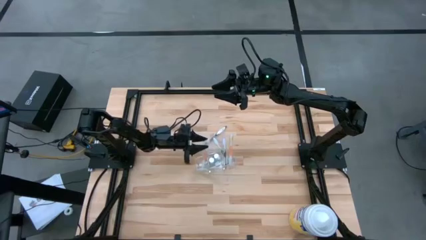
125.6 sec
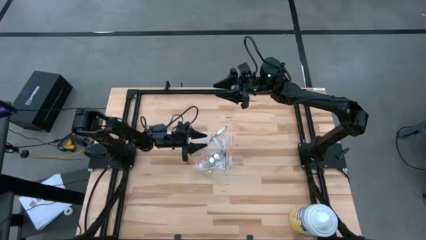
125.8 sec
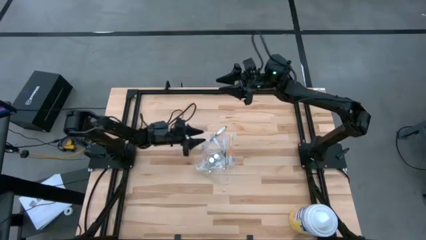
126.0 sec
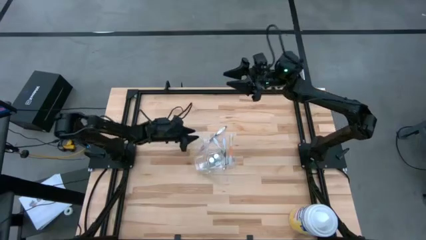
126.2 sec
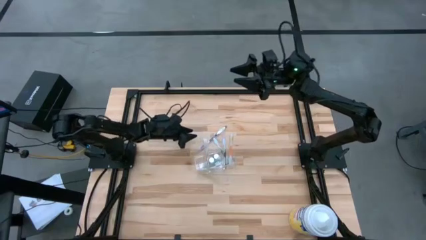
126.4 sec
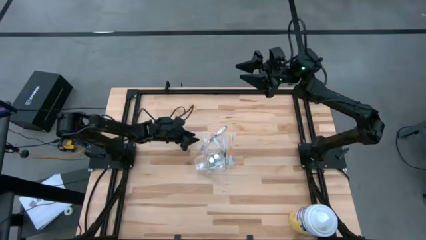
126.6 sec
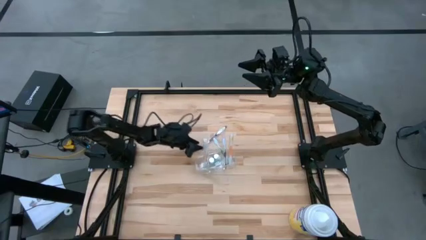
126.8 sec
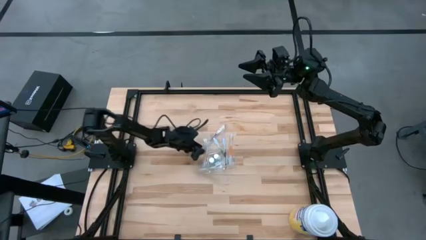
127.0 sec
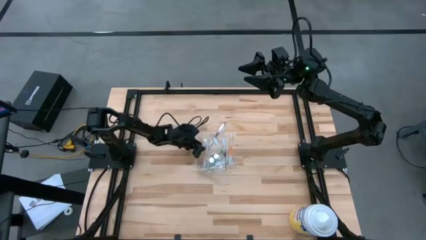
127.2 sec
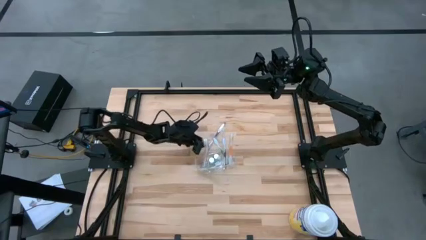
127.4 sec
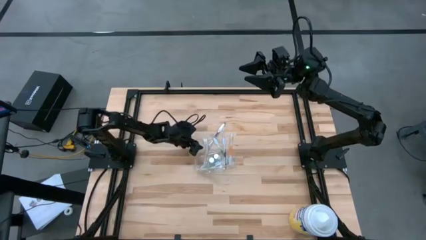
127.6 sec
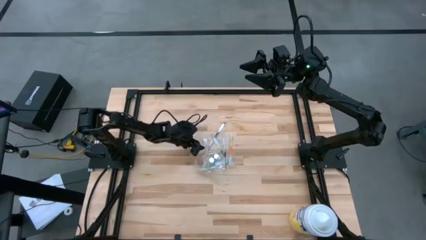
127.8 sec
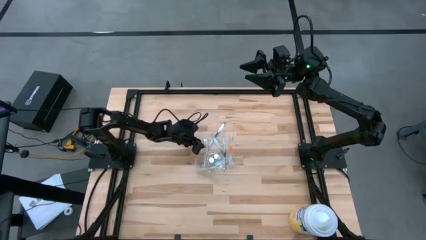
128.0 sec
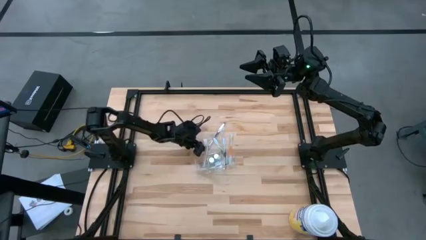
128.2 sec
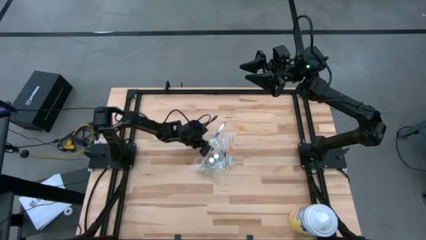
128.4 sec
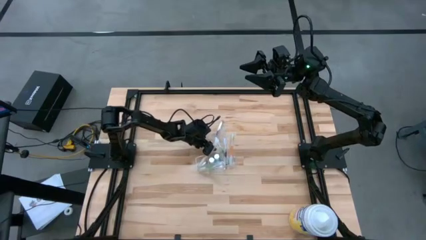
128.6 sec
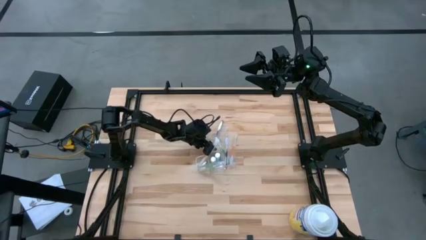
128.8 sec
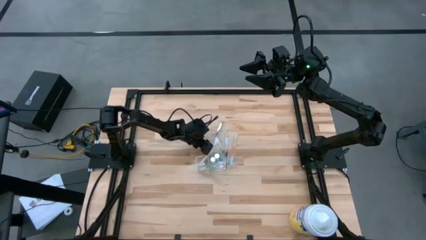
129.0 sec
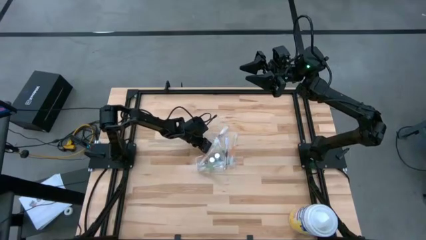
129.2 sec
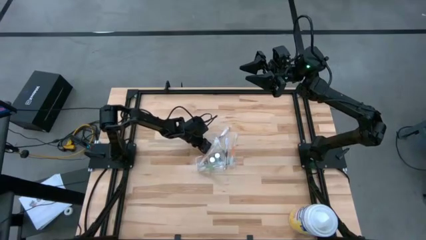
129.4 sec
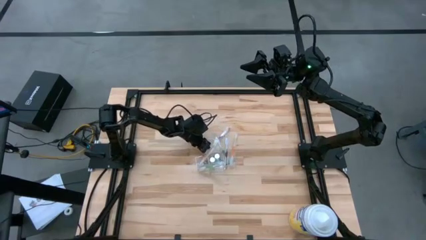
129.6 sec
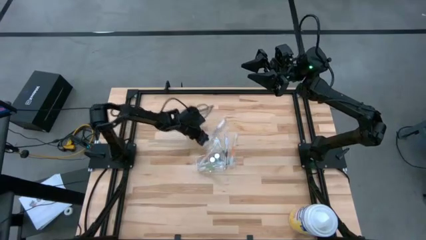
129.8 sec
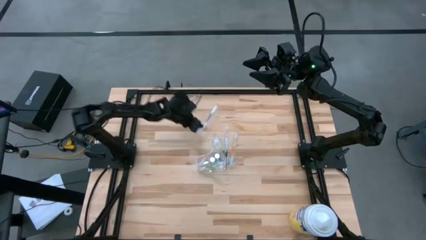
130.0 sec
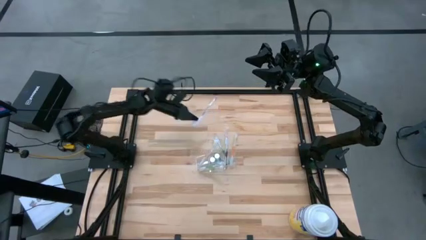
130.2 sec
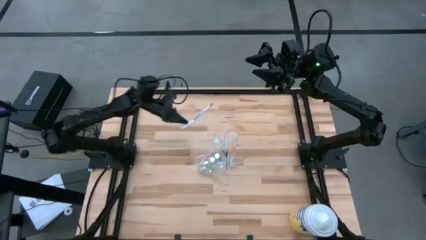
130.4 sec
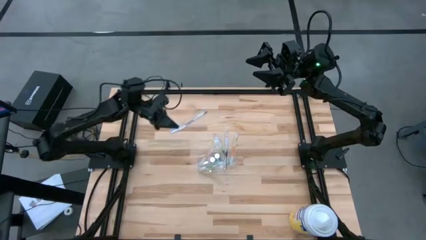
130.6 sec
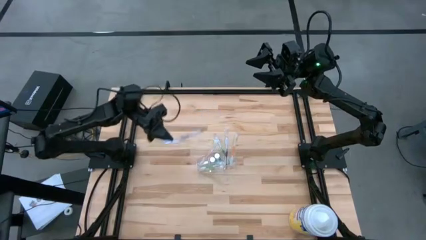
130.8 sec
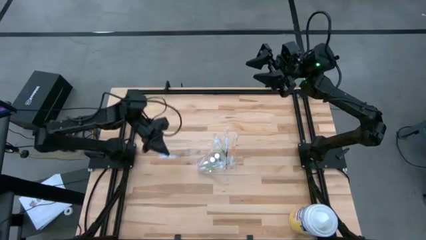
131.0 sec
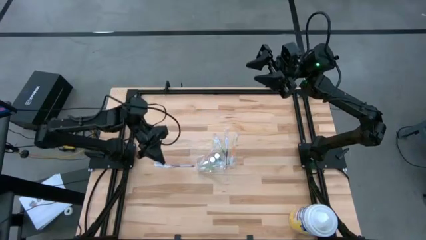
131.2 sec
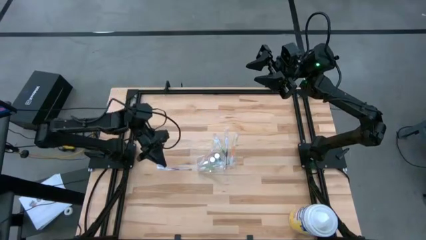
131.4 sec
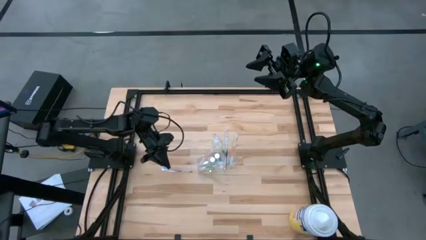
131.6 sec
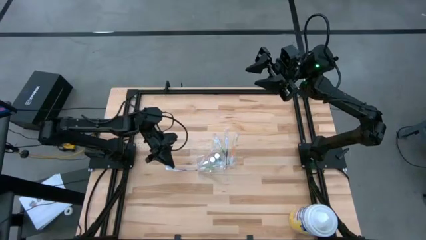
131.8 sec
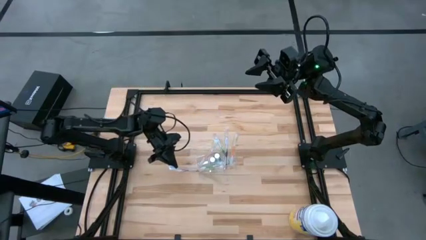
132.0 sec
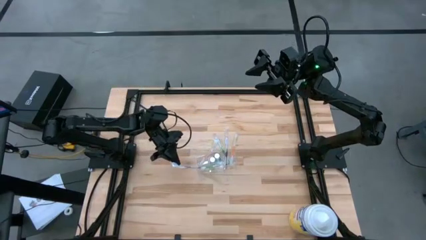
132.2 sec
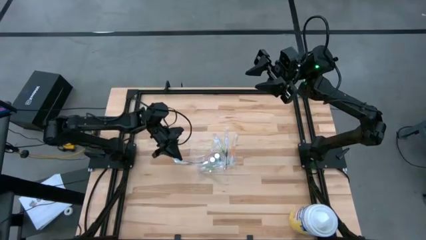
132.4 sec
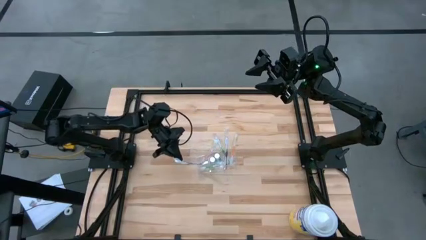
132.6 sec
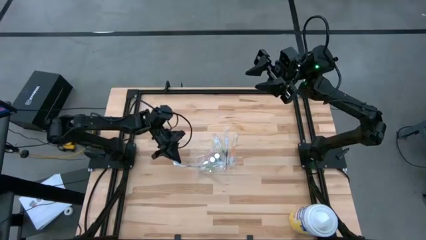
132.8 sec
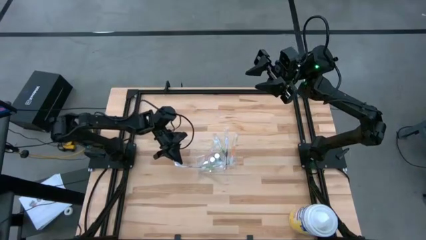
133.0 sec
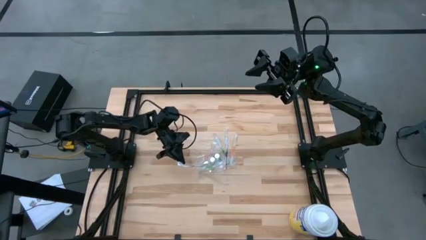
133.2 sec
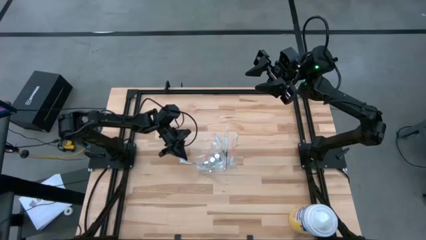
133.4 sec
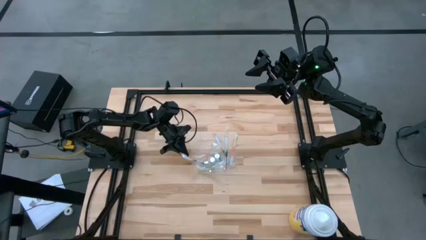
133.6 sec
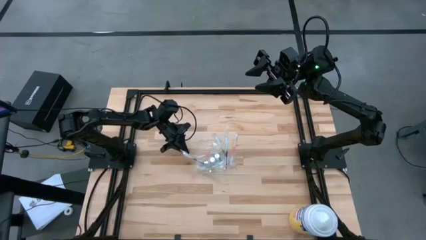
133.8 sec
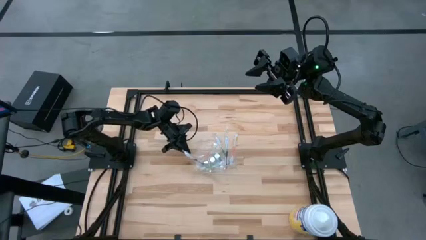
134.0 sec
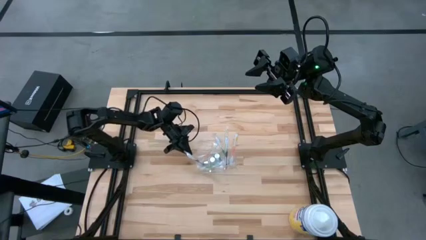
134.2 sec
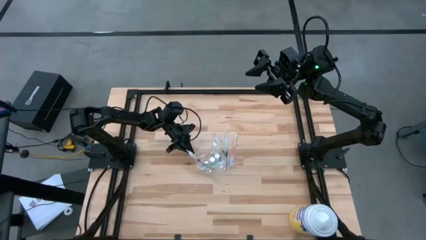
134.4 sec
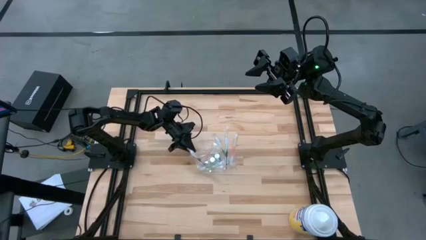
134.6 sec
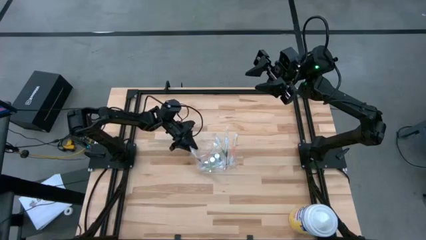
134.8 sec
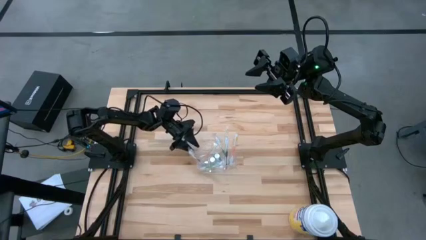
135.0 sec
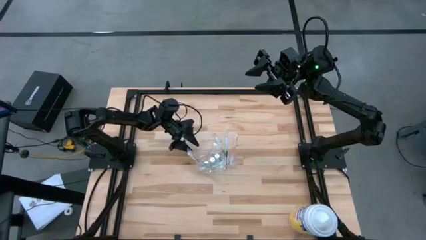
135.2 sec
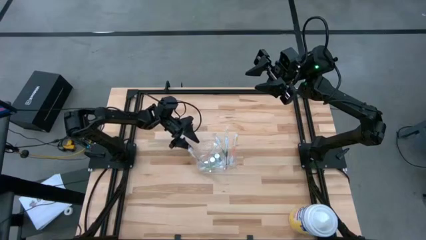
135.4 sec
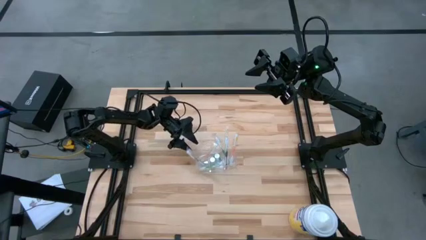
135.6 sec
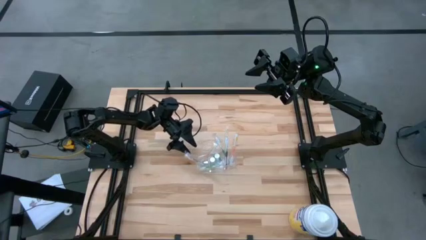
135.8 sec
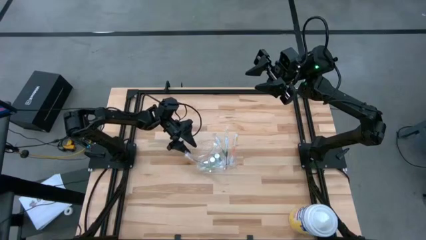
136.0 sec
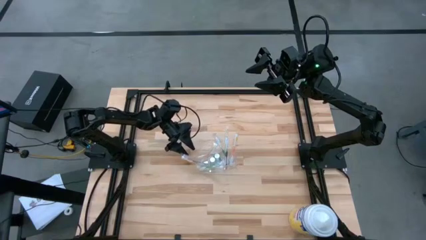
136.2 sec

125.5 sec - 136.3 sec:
Task: Pick & Place toothbrushing station
Put the purple toothbrush into the transparent organizer

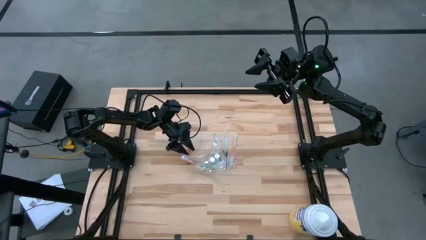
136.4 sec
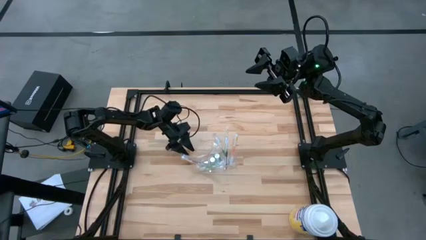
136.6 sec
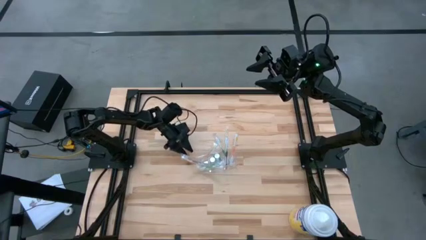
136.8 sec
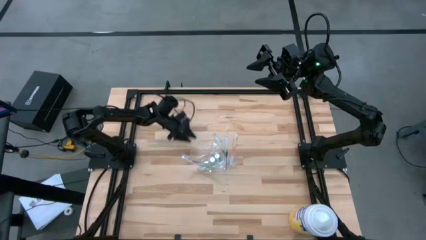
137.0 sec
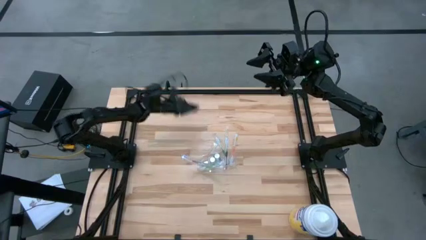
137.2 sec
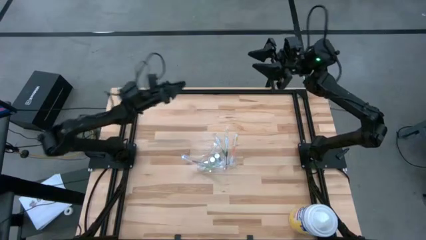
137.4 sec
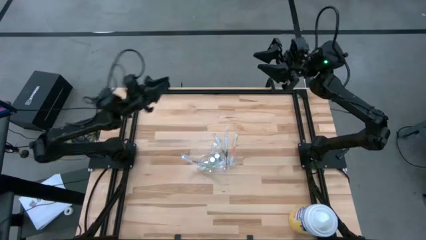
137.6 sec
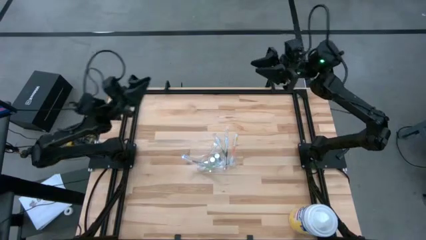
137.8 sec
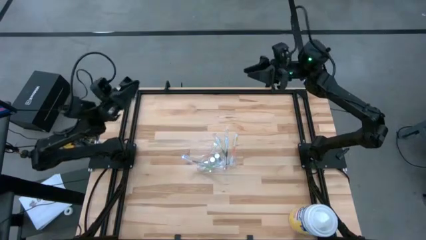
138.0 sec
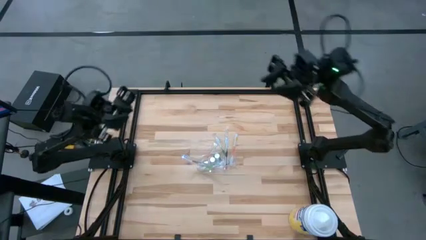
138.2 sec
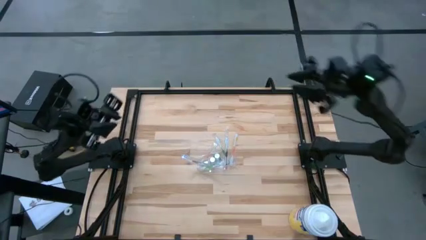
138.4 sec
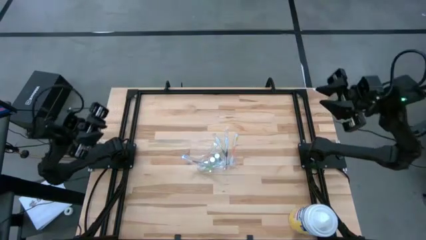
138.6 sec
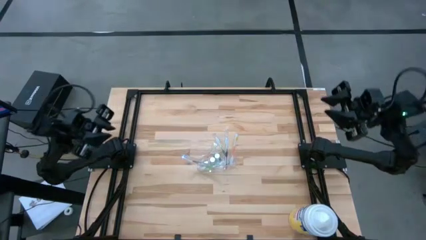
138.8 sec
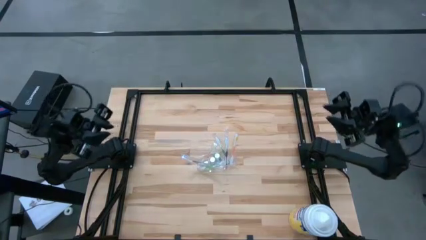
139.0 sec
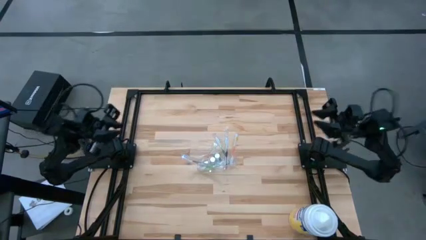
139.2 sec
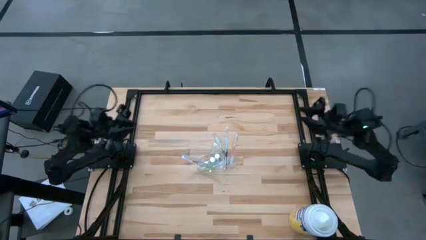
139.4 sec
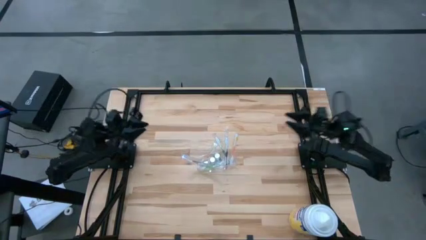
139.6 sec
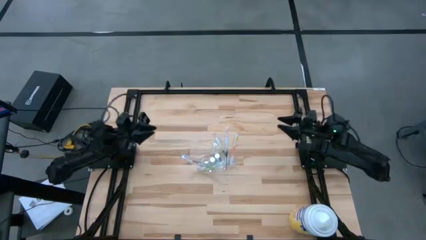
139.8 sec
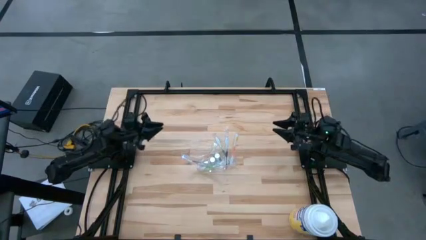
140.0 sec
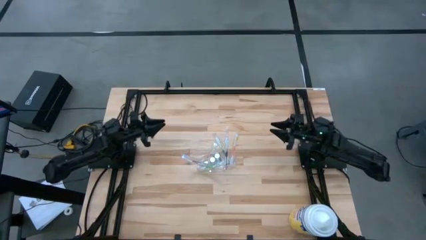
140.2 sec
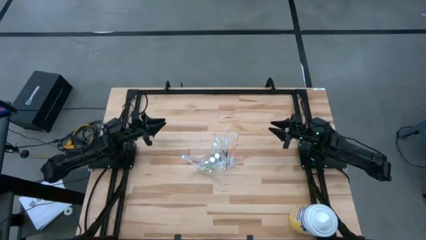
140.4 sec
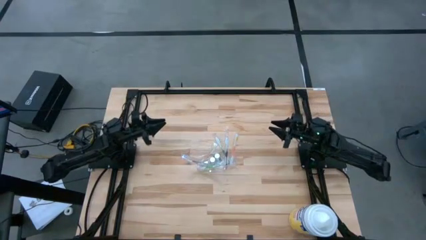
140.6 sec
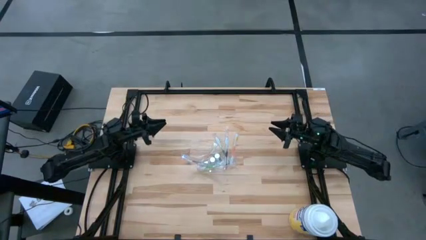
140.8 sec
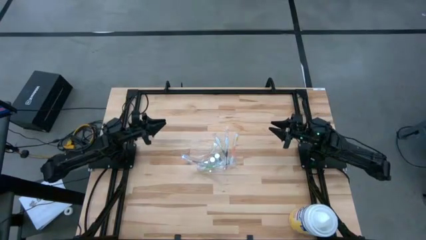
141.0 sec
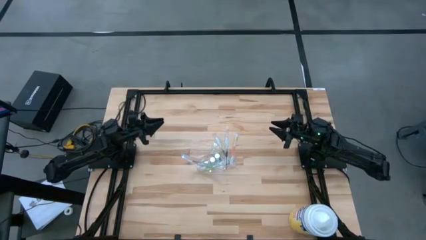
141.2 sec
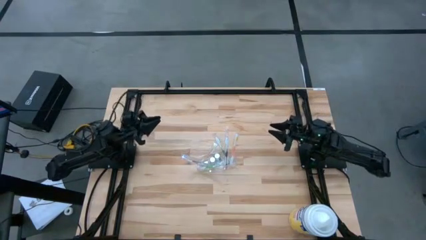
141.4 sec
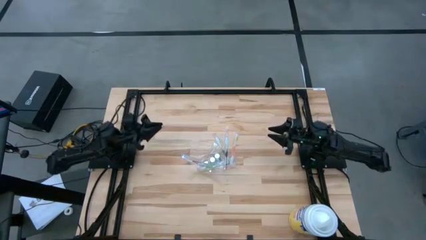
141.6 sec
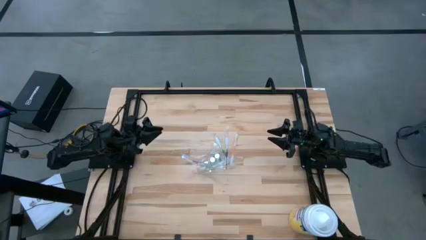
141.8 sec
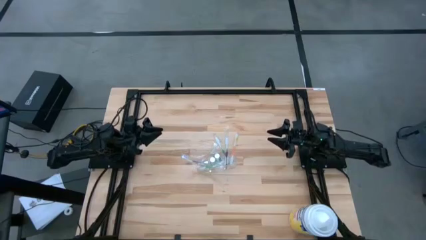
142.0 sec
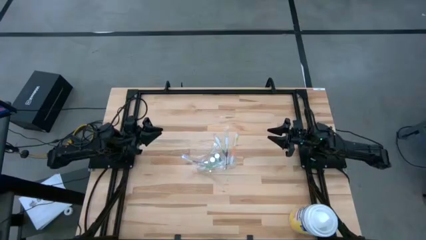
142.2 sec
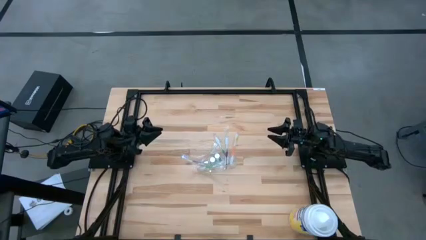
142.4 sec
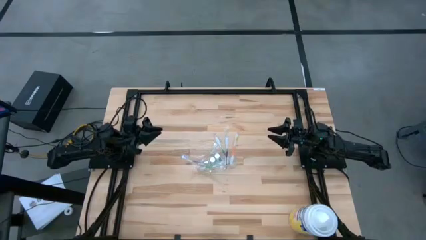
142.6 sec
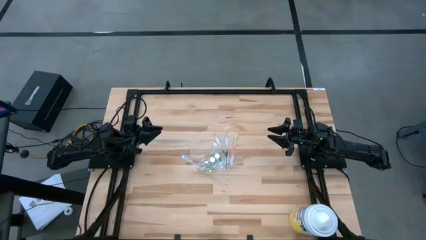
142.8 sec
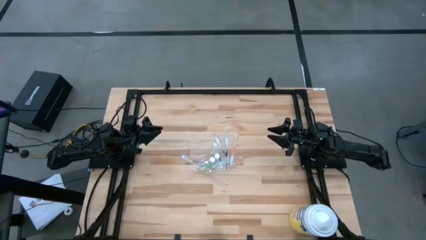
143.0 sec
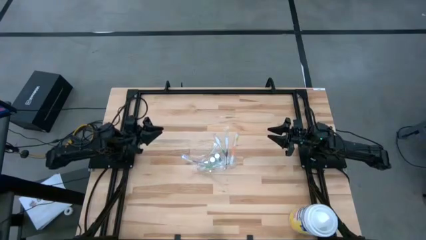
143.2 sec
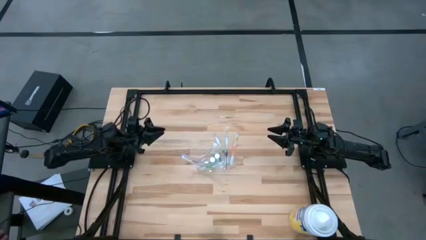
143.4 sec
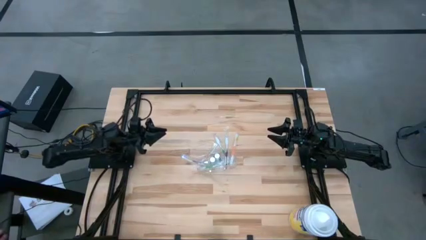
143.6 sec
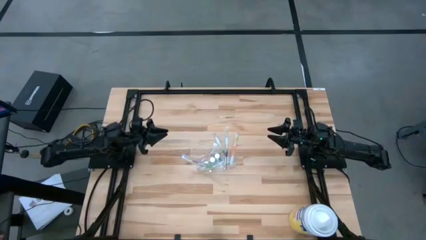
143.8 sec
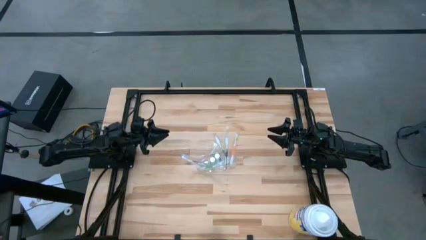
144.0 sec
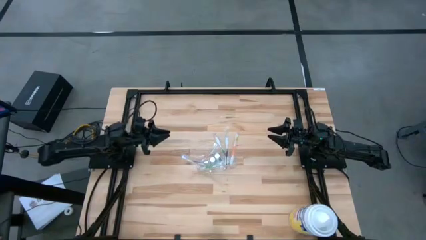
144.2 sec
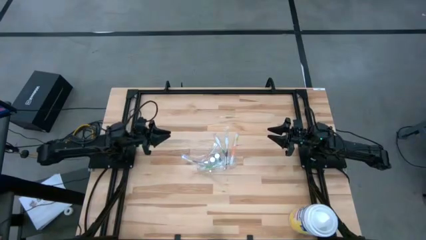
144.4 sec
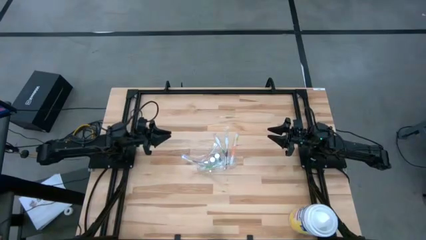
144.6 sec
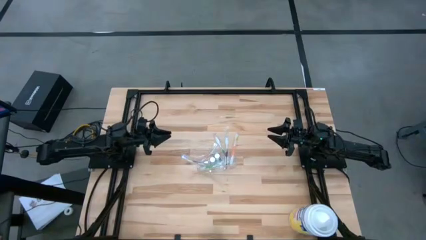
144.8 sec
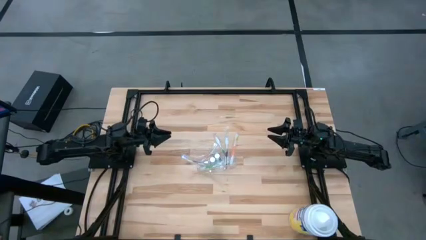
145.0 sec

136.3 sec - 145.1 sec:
Return to Home Position
